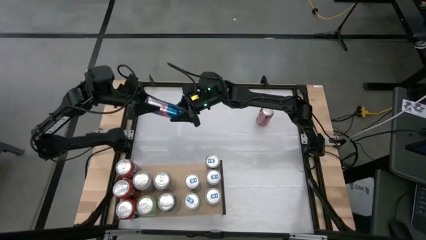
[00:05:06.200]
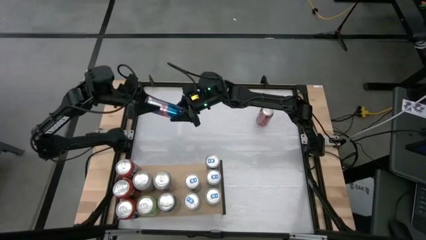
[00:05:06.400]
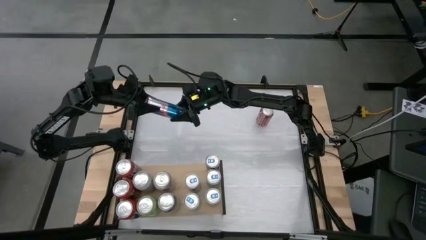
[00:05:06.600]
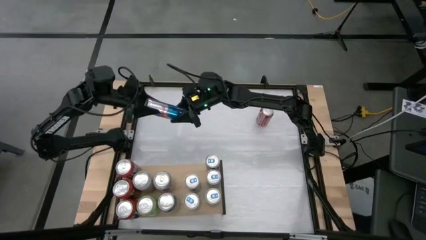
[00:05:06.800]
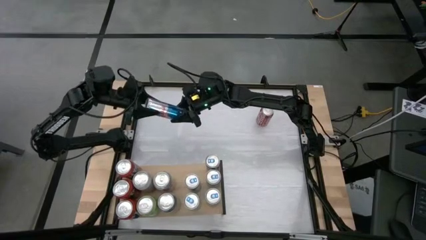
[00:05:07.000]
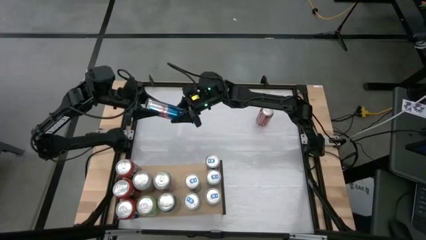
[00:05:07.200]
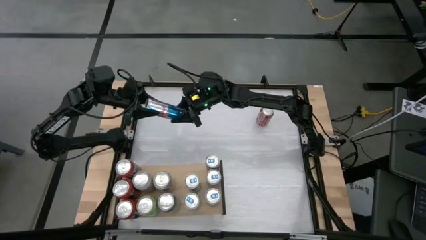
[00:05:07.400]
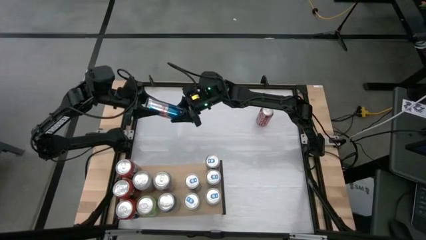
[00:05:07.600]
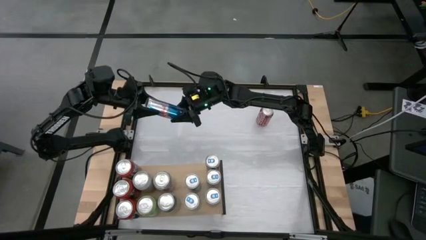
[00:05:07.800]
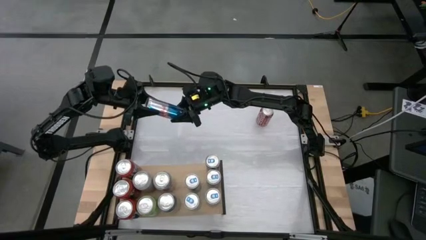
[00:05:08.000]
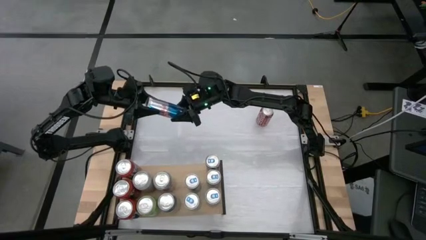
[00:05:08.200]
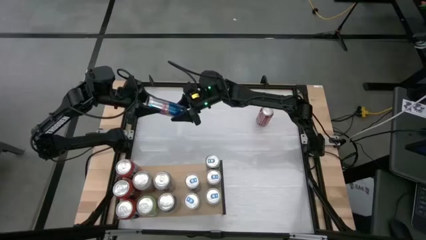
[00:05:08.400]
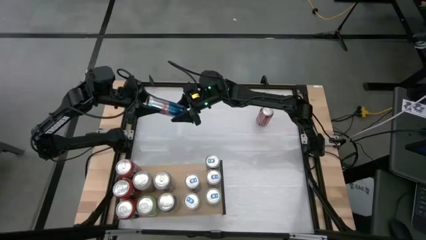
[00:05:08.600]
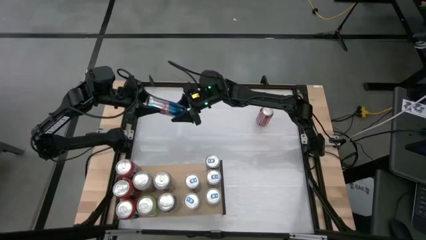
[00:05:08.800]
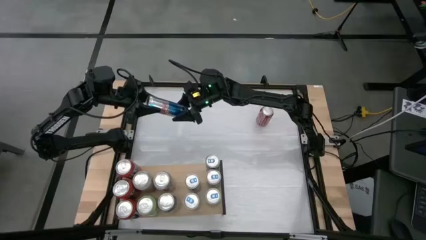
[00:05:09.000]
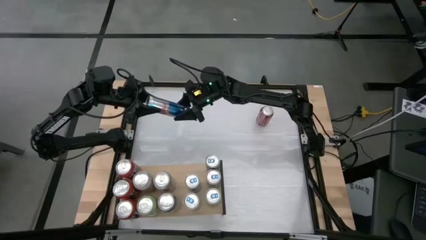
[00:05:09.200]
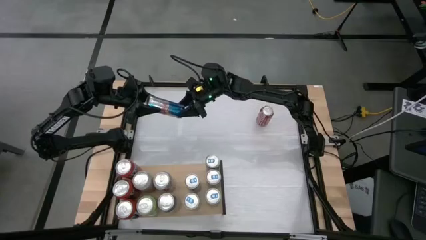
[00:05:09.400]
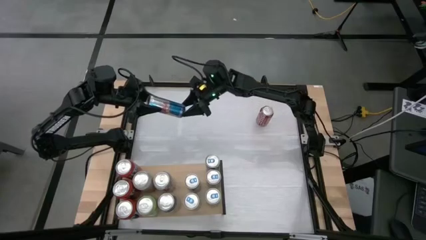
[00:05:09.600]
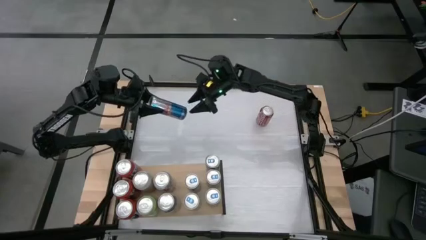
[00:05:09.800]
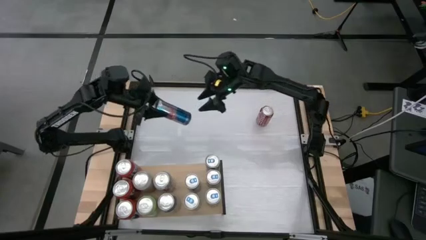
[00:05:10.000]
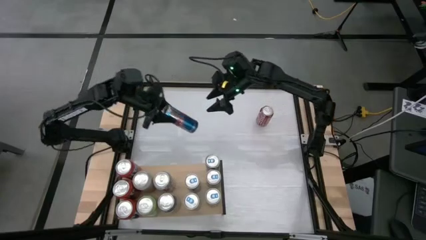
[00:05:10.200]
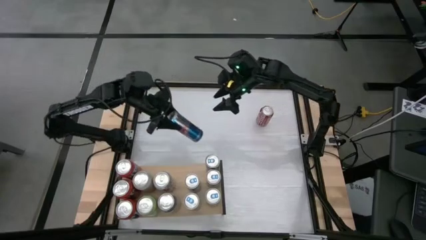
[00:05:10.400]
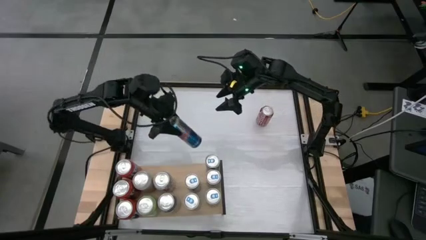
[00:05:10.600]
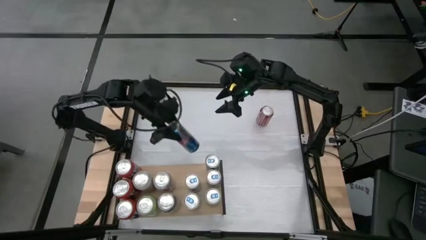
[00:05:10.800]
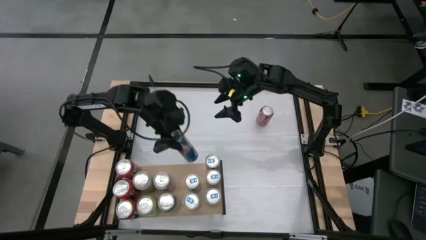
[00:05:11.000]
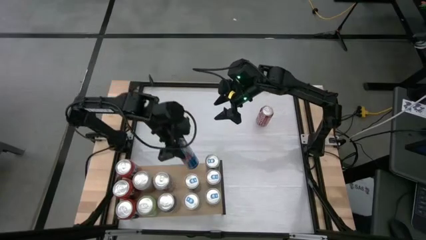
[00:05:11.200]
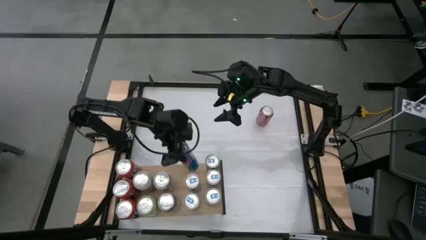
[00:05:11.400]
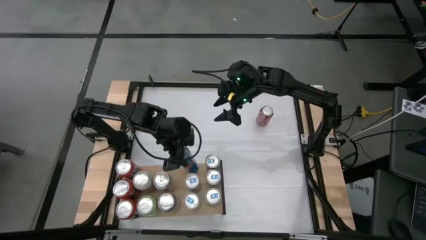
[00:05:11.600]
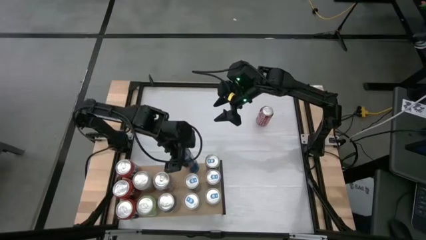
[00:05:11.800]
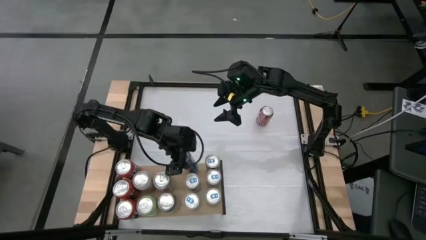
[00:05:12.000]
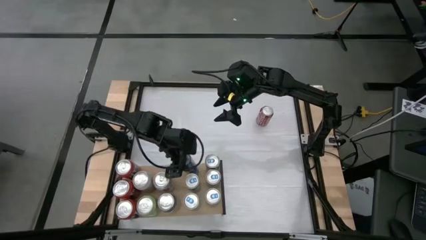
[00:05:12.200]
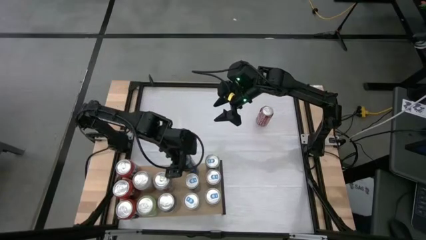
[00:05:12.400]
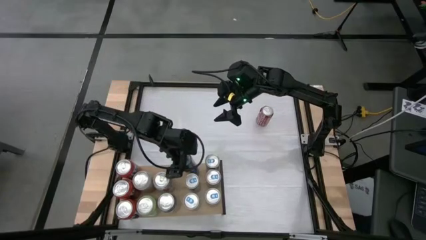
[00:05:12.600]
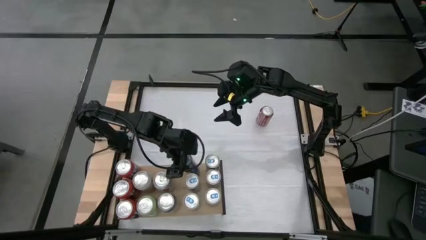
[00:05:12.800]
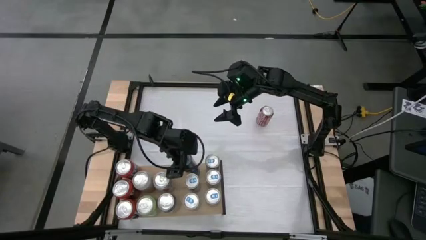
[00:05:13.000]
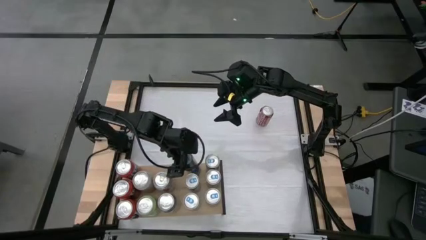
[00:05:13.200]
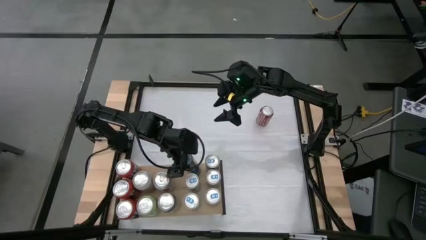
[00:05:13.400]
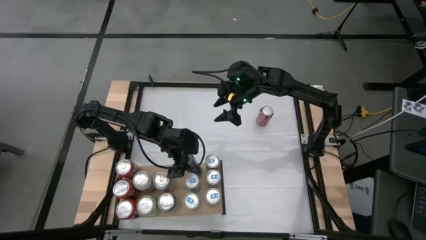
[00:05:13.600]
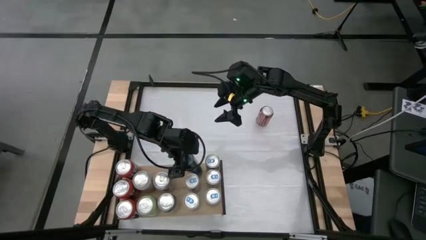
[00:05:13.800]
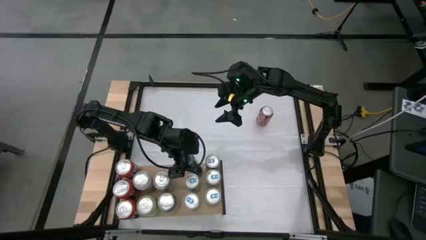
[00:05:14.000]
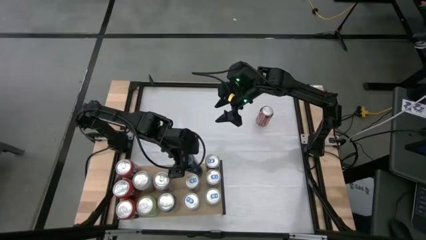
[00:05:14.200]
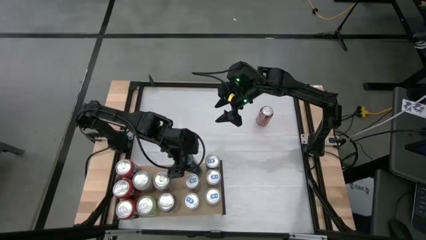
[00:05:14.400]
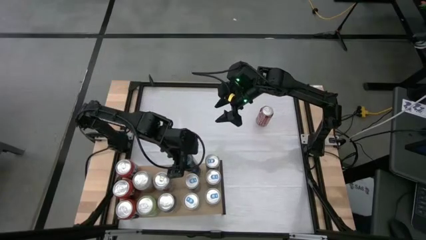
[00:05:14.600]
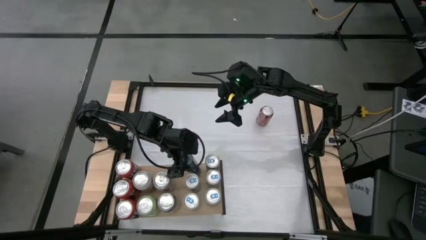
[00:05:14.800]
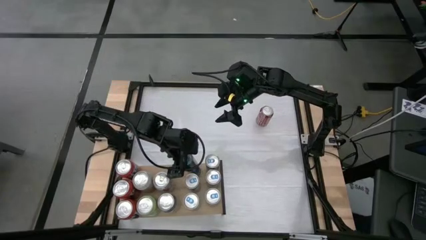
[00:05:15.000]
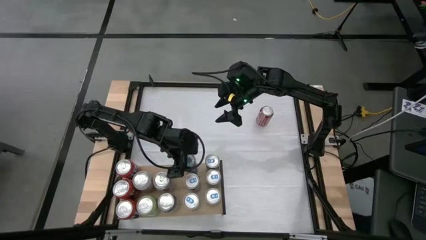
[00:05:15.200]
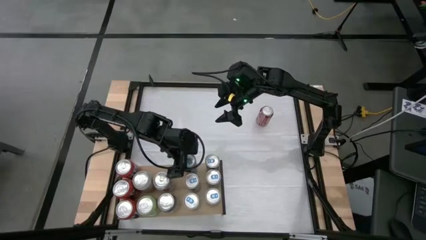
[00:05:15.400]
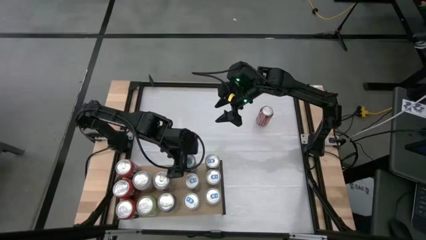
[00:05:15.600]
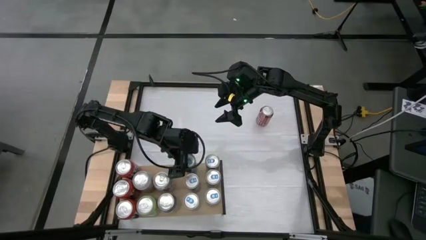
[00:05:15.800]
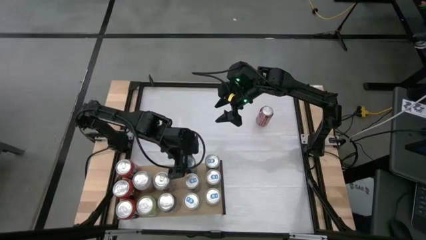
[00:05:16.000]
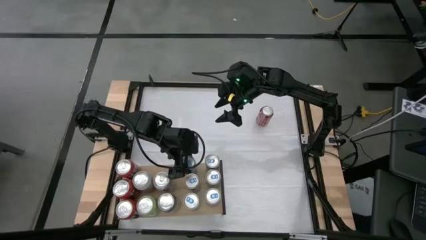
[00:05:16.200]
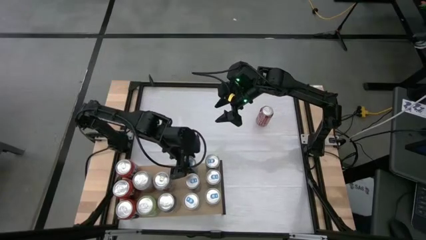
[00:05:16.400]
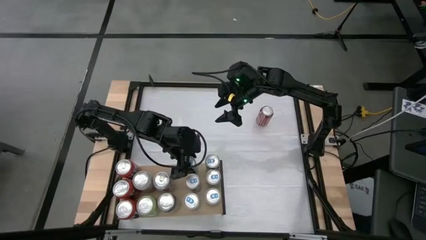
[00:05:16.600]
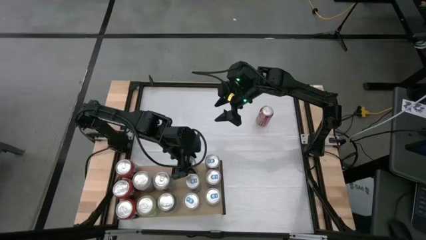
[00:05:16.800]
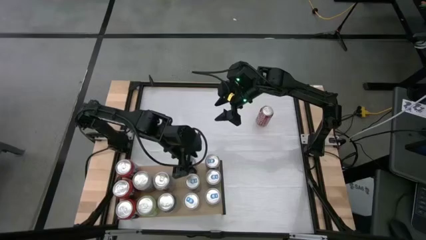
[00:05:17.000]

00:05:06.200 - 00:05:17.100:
Task: Place canned beverage on shelf
Put the blue soda can on the shelf aligned with the other blue soda cans

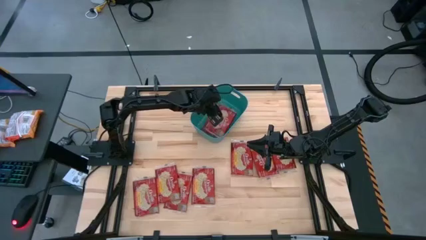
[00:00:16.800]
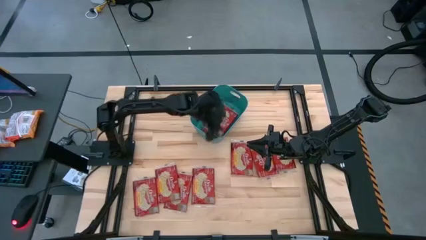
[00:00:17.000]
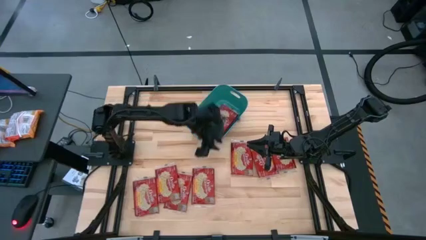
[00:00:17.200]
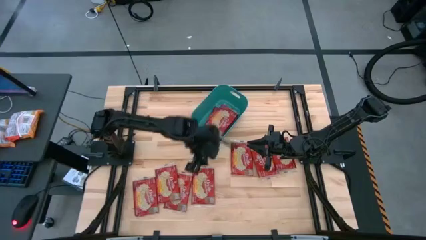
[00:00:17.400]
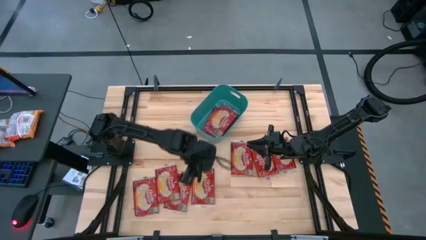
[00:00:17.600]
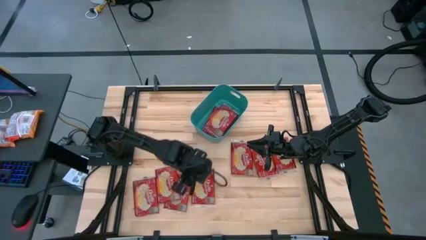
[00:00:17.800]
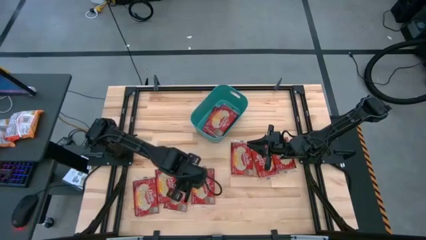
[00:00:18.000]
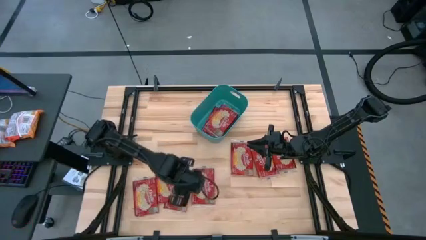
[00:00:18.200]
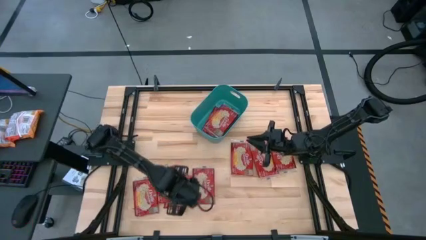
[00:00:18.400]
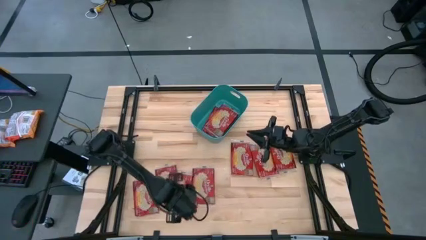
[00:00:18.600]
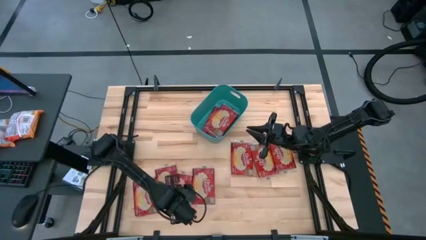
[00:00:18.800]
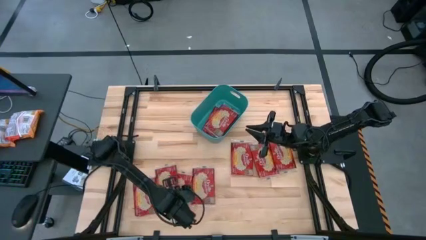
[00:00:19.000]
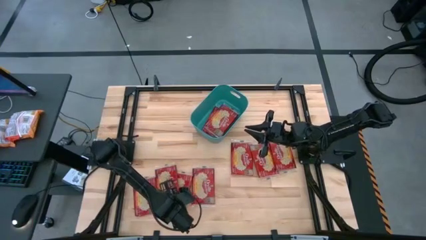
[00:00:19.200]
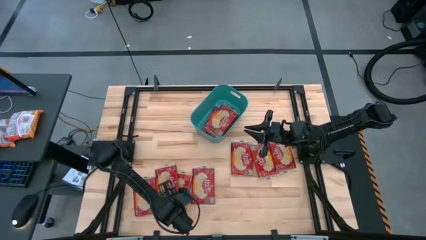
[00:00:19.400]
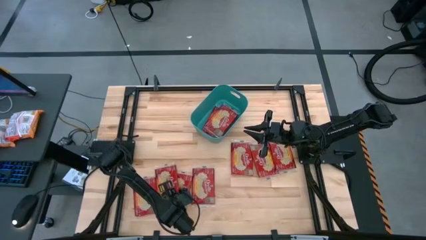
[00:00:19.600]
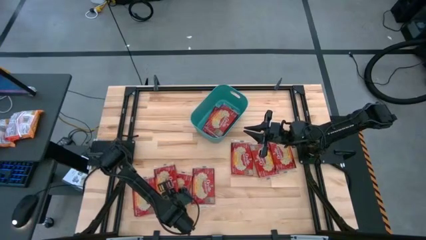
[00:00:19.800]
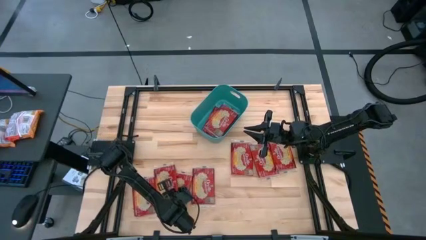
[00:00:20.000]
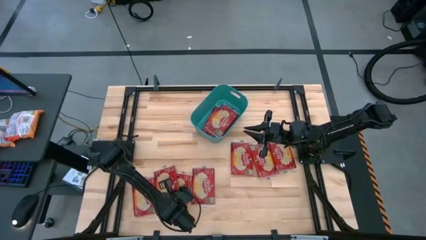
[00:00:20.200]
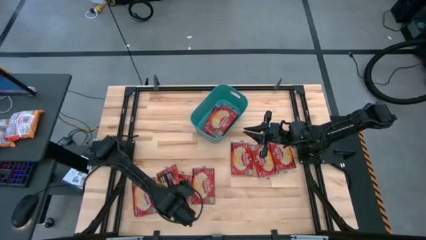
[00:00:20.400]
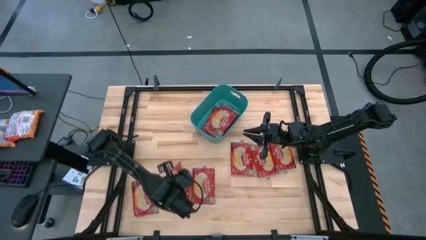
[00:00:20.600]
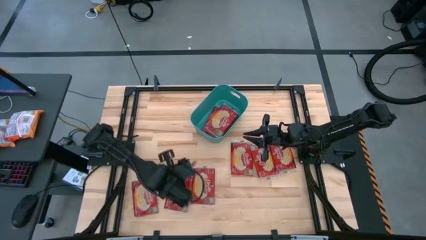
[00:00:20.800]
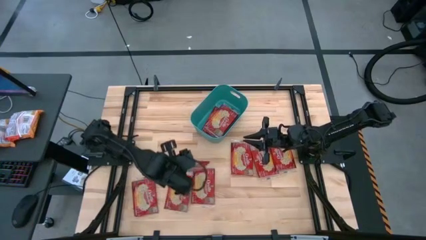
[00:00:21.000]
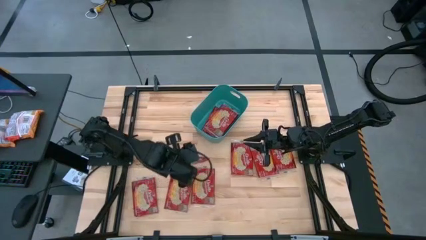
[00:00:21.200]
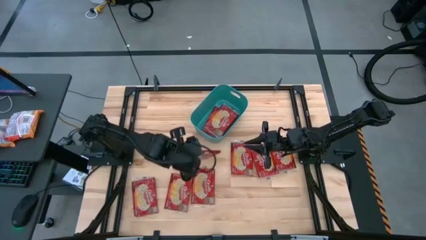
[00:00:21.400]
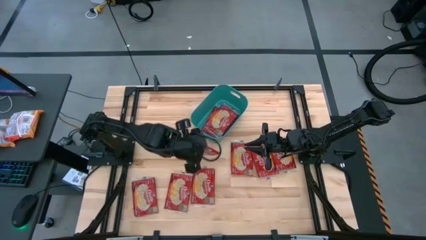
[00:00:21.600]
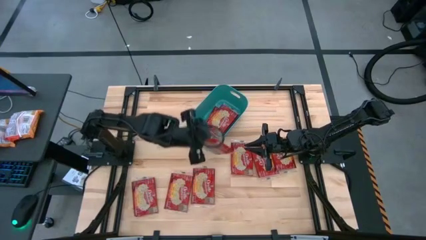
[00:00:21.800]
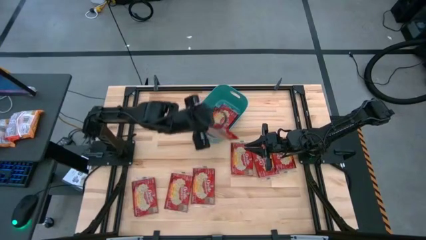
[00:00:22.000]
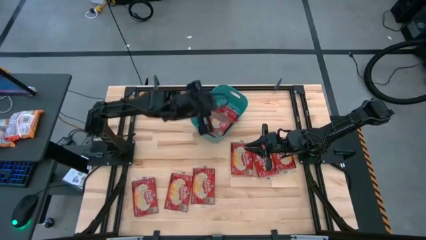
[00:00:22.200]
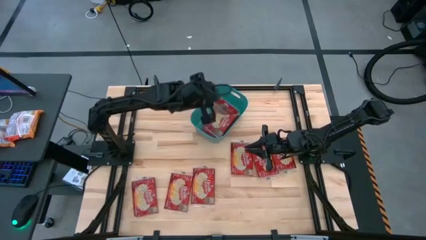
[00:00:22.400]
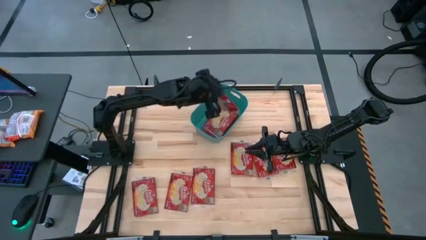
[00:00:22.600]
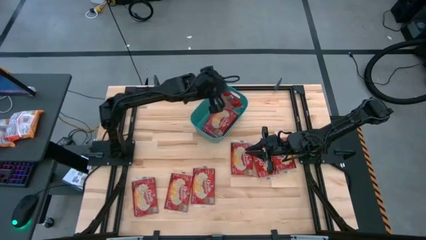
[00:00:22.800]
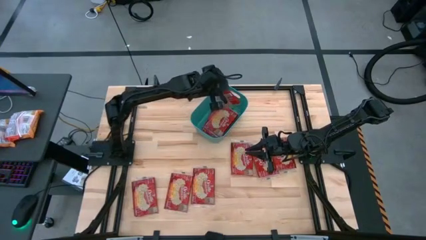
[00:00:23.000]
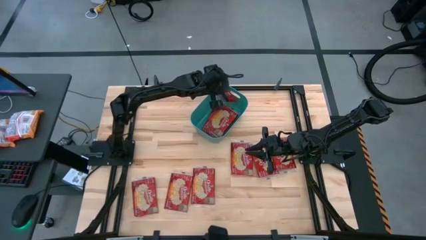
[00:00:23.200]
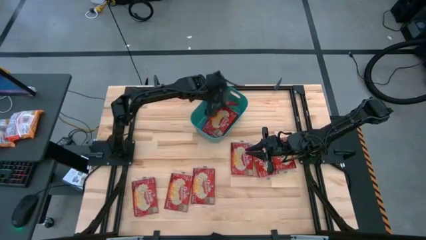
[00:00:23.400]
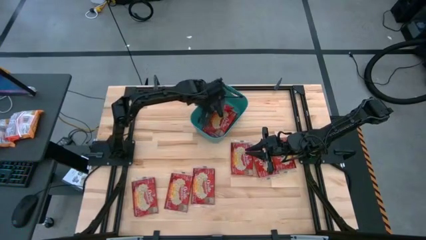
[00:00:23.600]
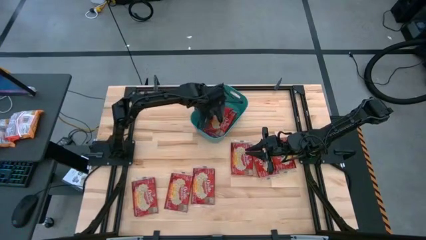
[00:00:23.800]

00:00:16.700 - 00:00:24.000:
Task: Sort popcorn bags into baskets
Put the popcorn pack into the blue bin
